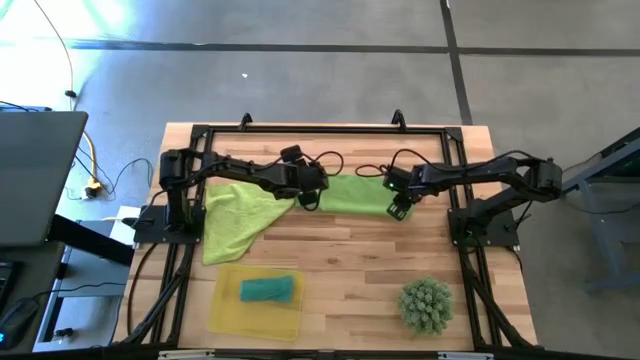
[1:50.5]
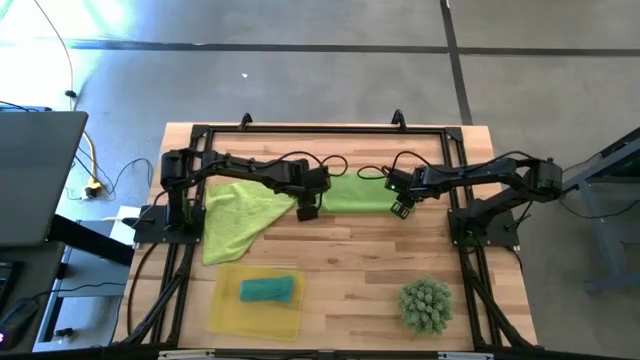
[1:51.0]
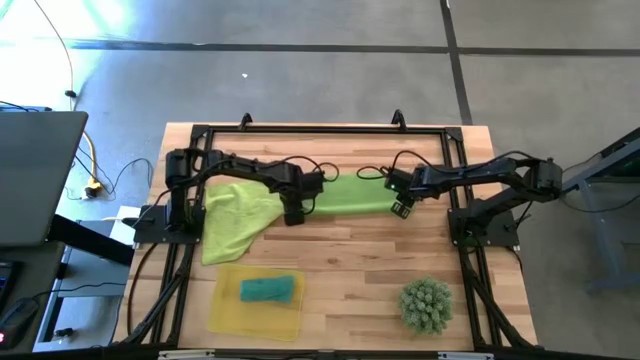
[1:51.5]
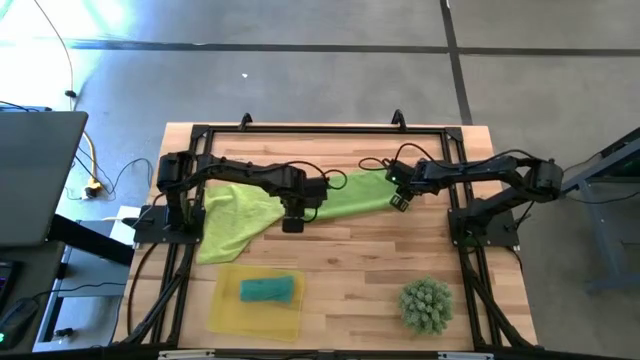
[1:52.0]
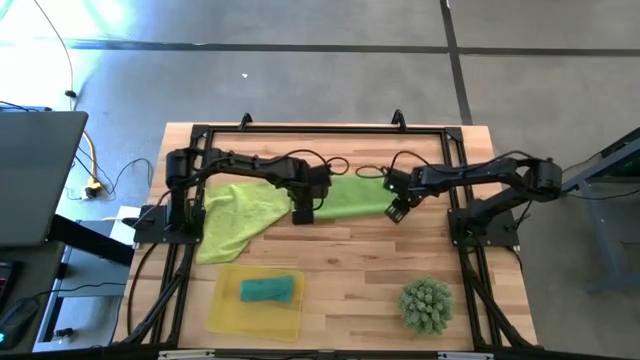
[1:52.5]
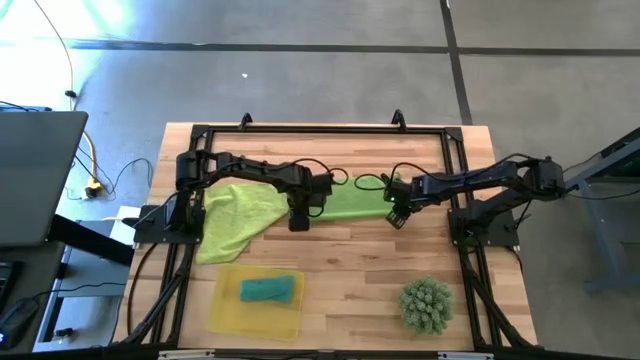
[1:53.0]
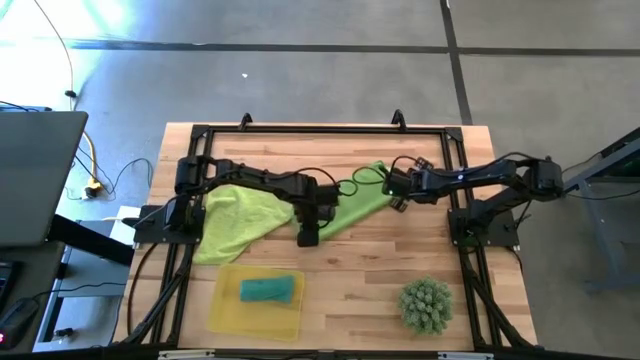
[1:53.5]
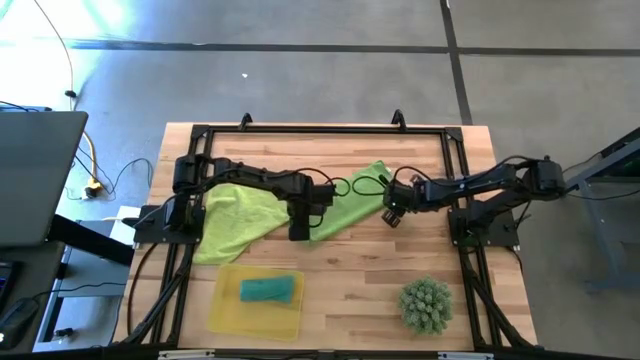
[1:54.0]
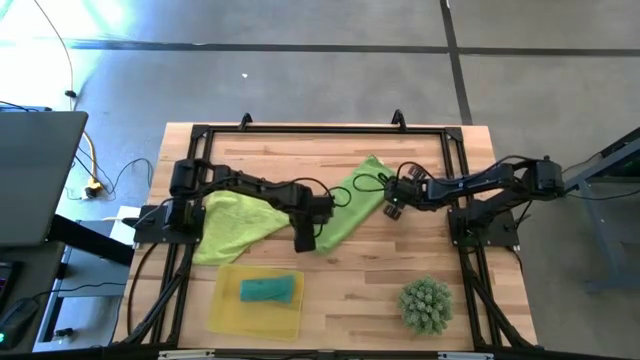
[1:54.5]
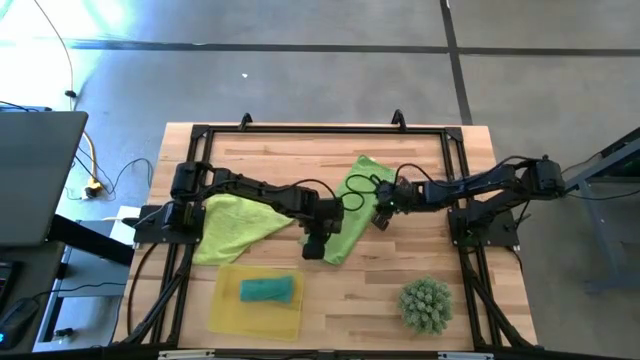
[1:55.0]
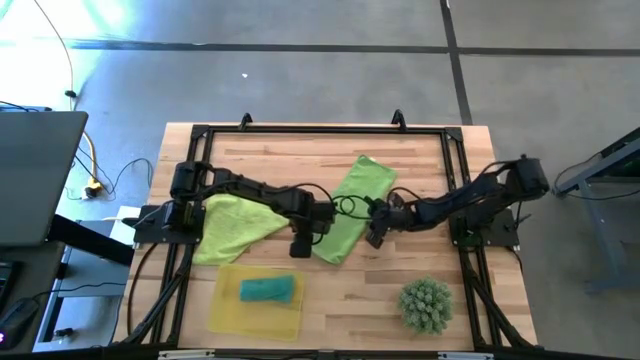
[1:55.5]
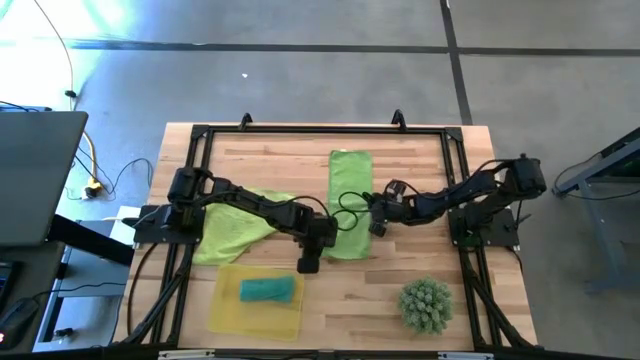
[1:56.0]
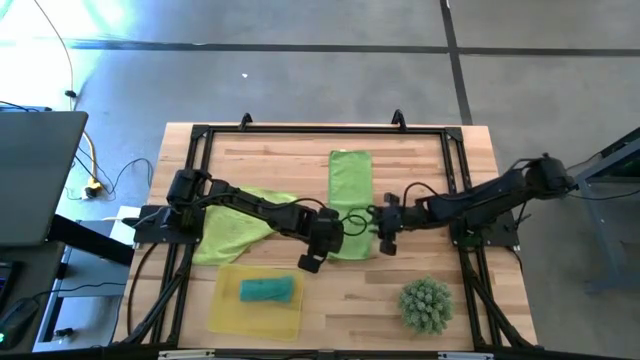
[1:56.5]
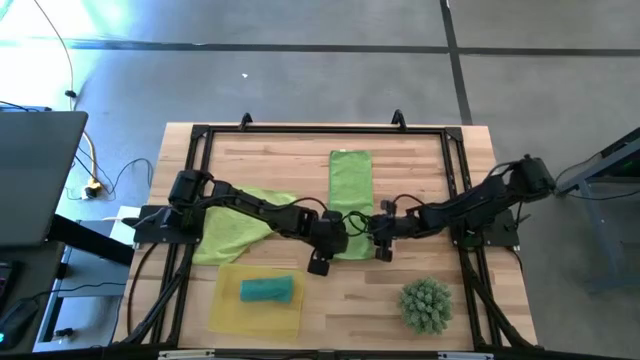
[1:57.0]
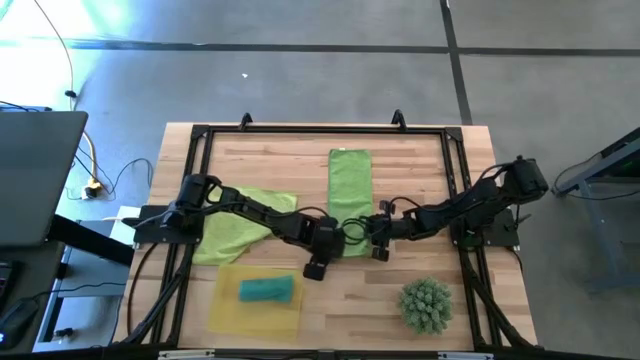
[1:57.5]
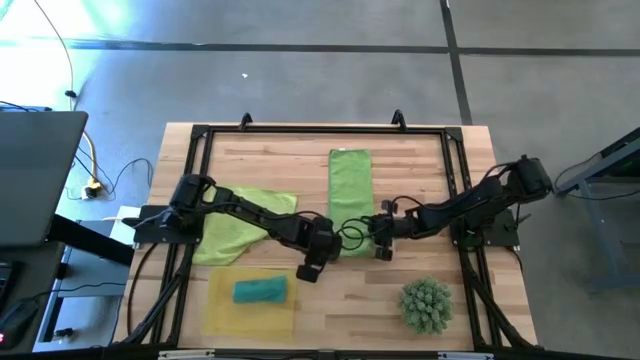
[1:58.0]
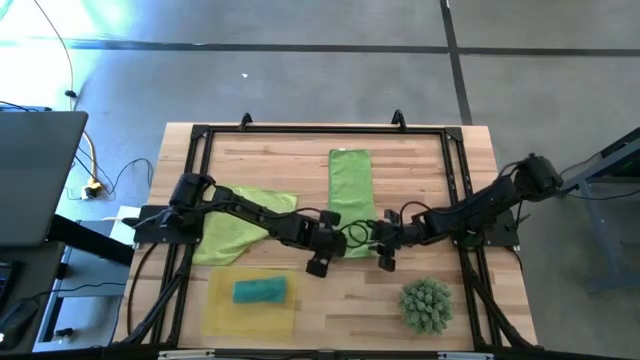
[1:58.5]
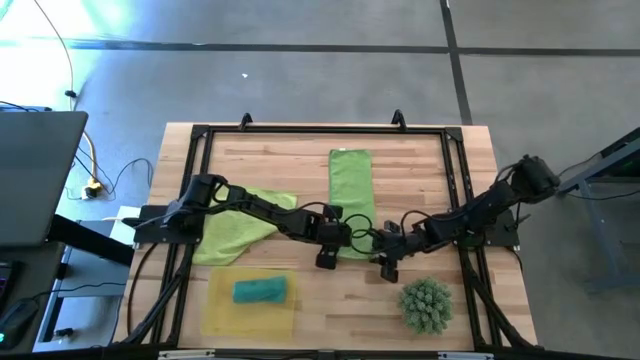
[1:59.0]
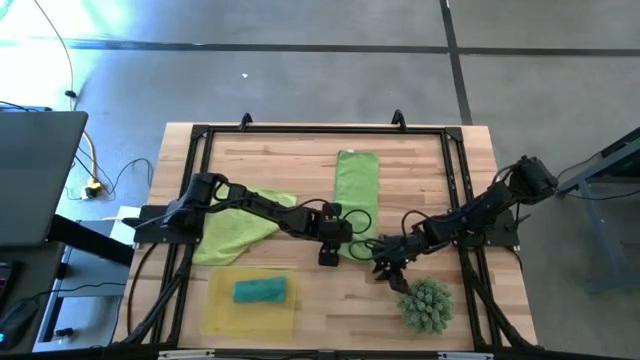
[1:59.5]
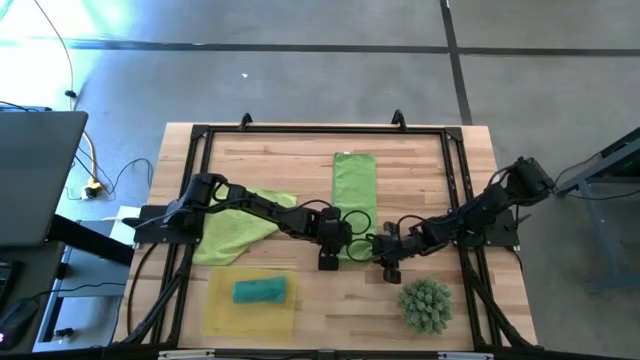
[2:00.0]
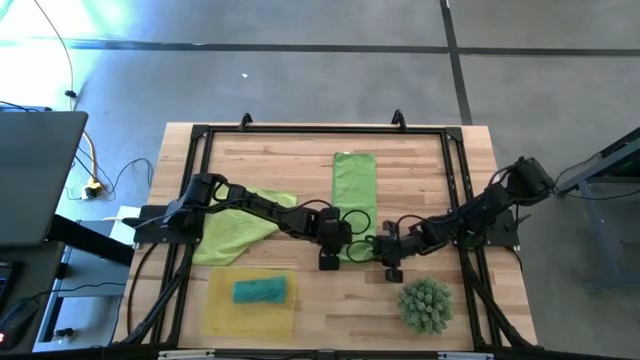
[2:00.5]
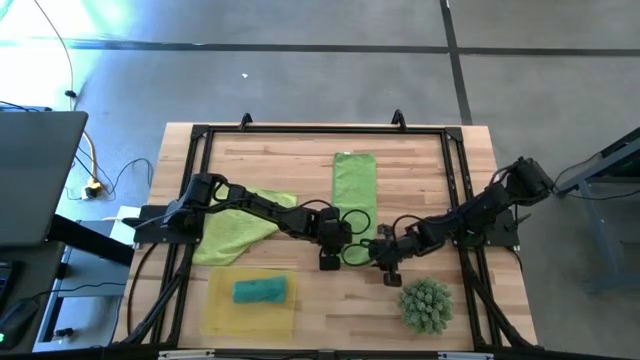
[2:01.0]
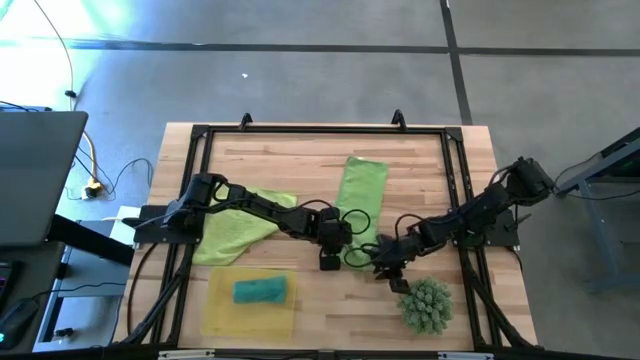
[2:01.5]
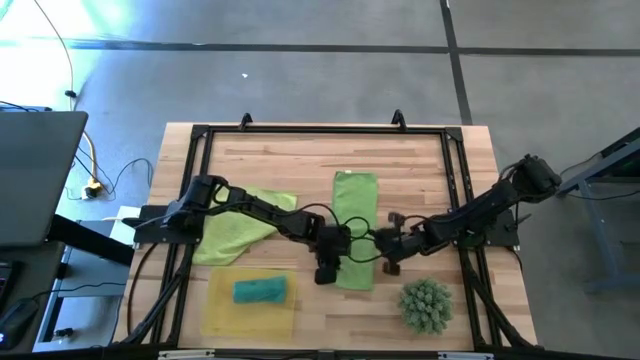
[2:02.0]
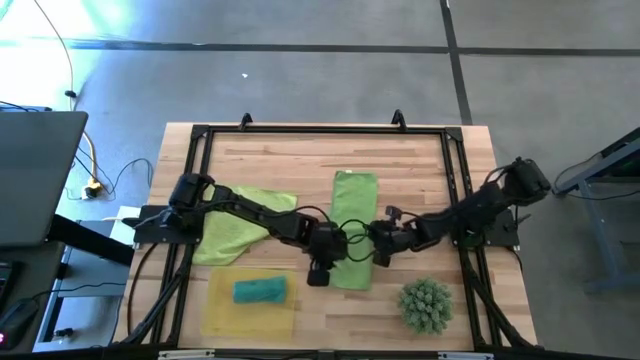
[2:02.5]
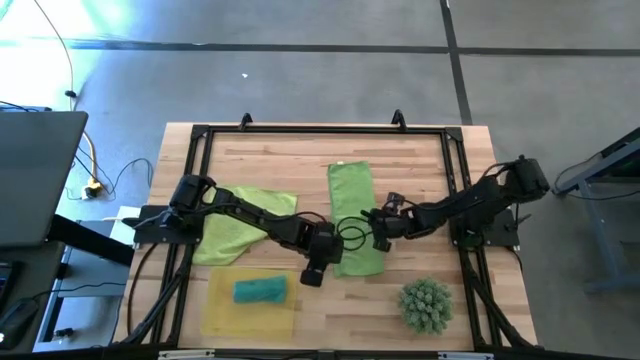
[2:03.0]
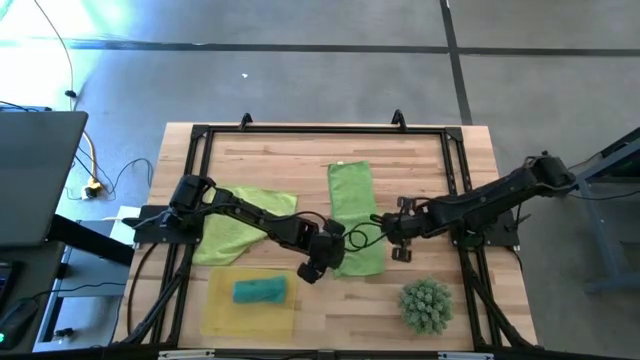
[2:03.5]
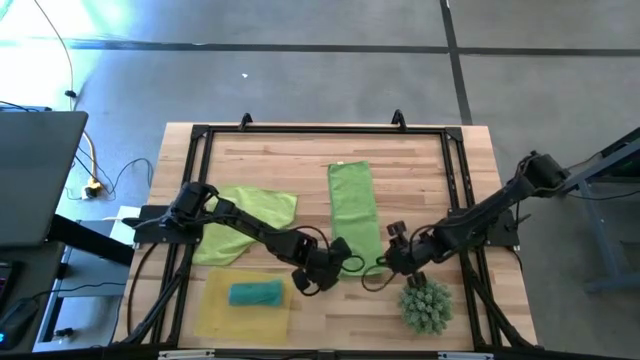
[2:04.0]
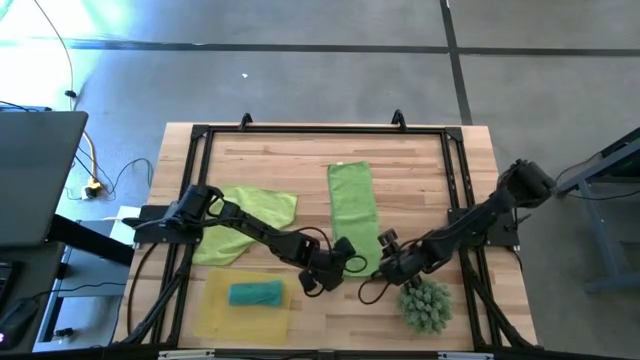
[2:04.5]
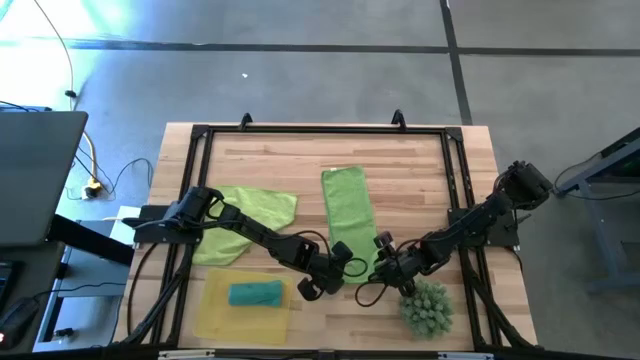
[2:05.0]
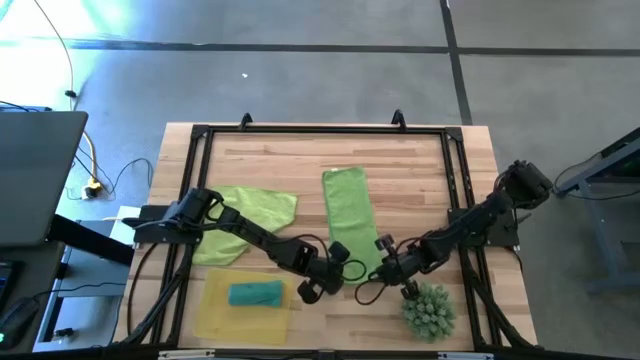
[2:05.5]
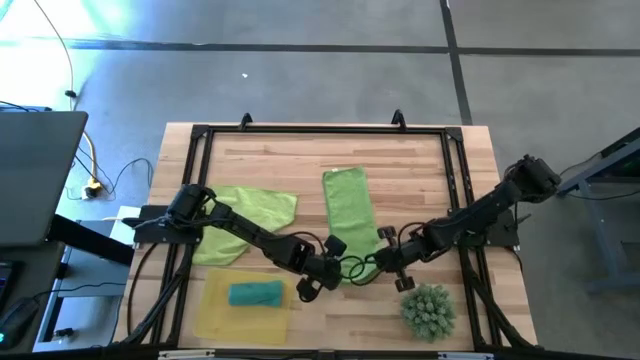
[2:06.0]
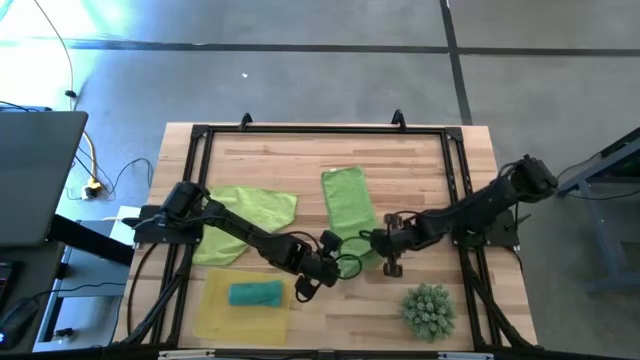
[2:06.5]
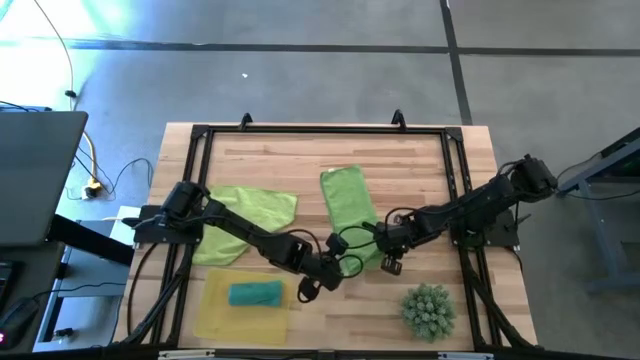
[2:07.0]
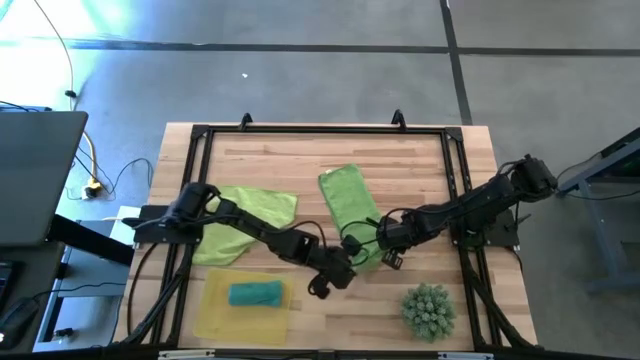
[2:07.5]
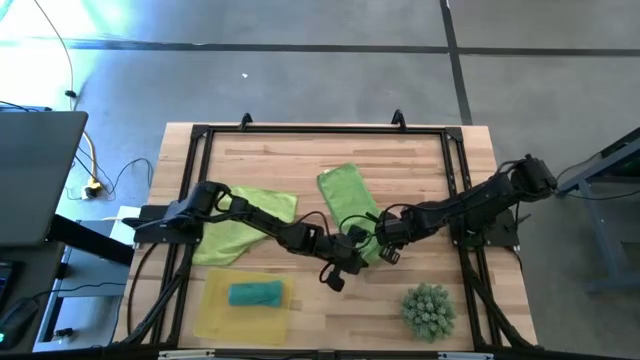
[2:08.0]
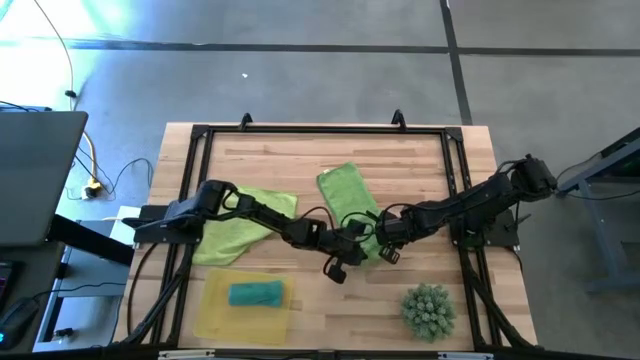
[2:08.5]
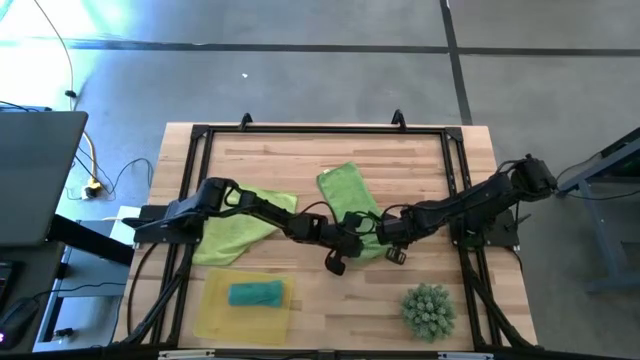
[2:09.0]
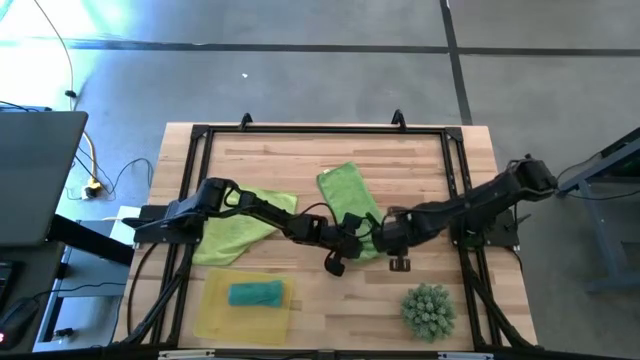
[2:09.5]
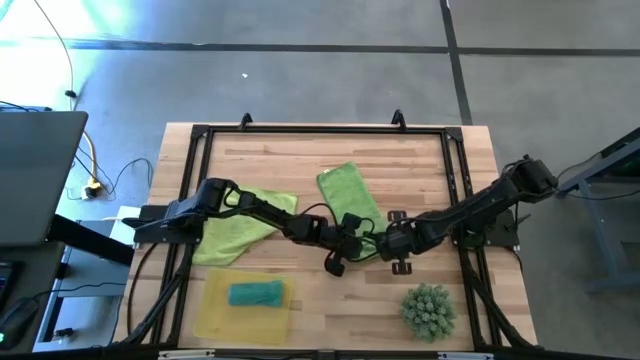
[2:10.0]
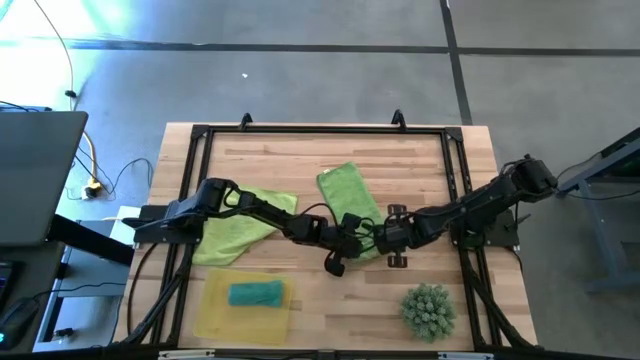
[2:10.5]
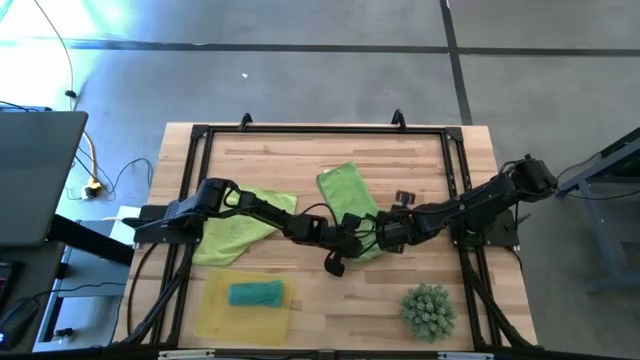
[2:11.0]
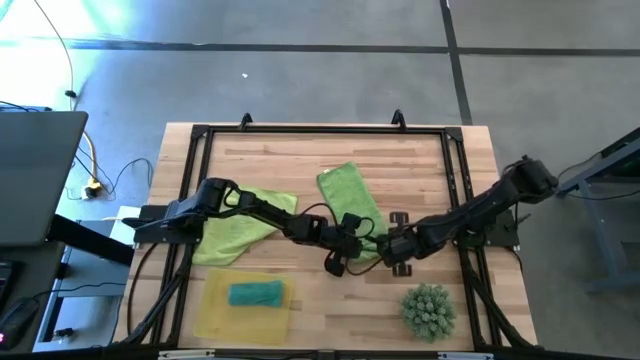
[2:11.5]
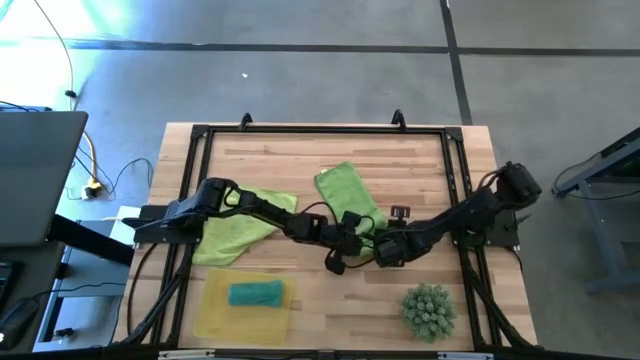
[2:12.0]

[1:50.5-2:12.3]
Task: Roll microfiber towels into tight, uniform cylinder then place into a basket
Roll the green microfiber towel
